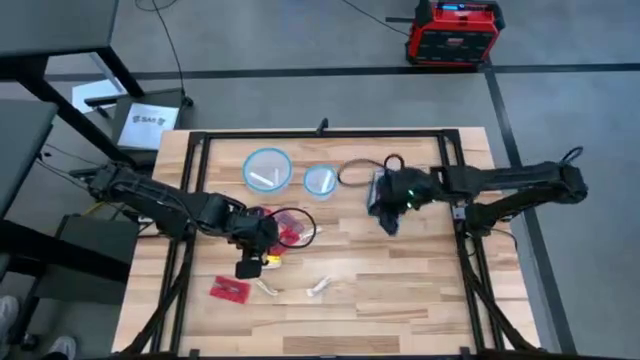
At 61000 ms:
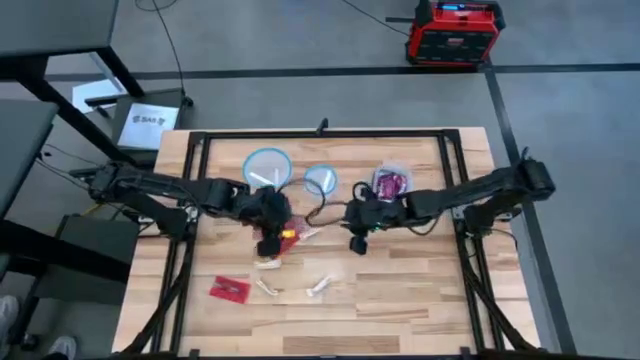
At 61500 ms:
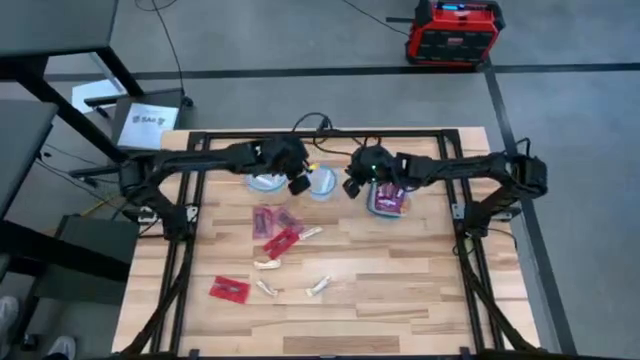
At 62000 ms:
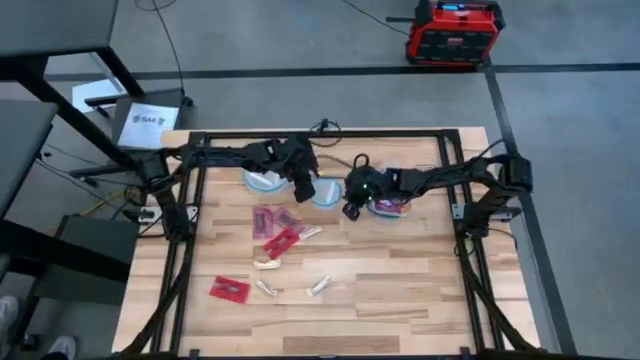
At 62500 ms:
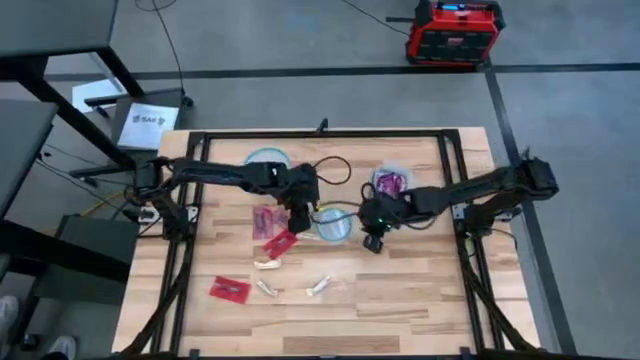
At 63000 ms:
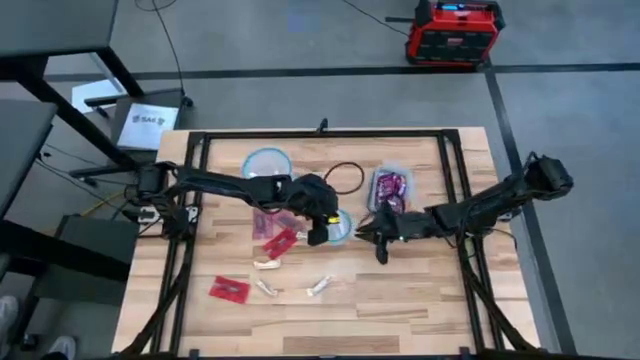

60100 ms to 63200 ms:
Task: Sort candy
Move the top center transparent bin to the middle

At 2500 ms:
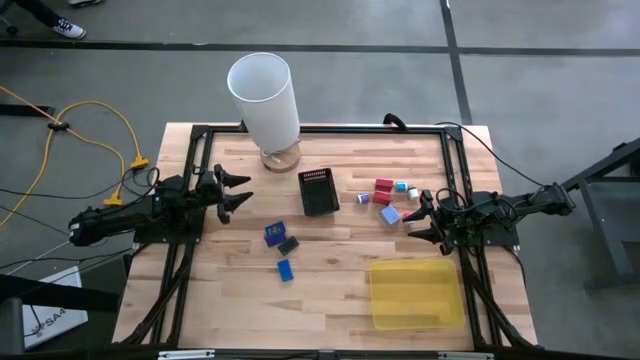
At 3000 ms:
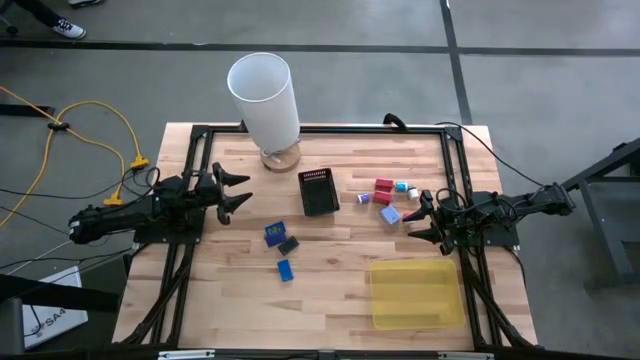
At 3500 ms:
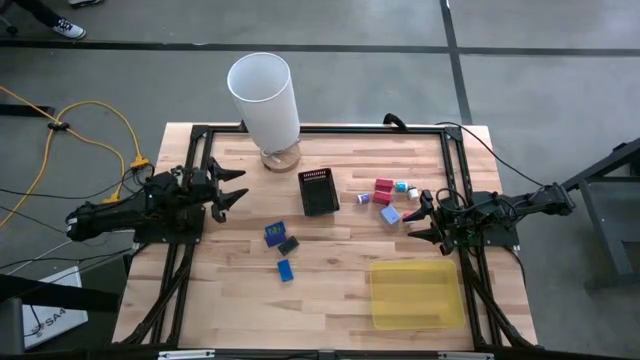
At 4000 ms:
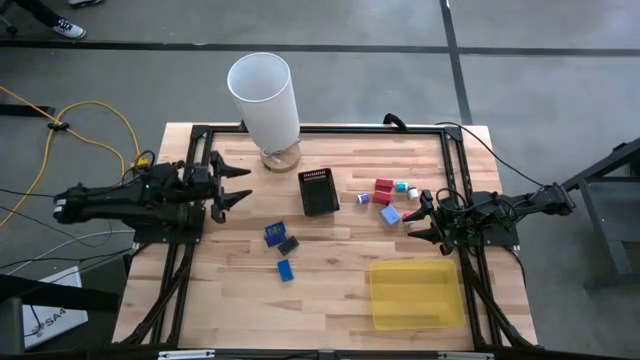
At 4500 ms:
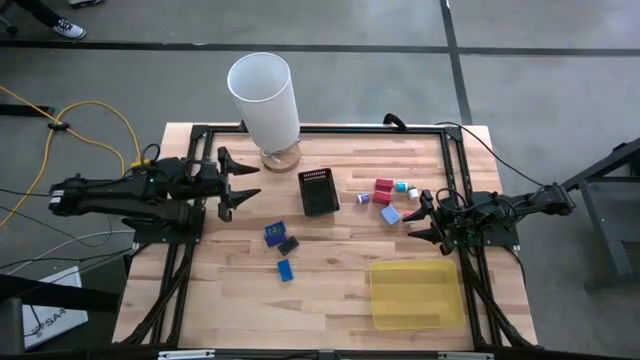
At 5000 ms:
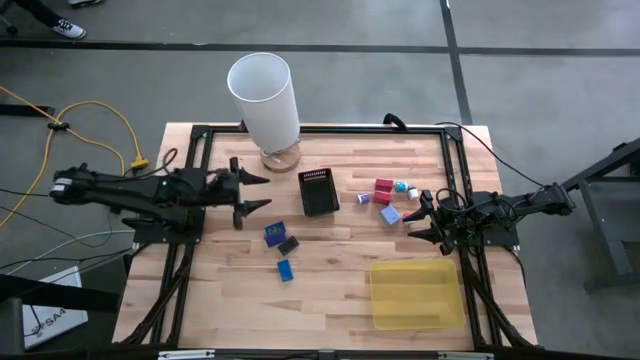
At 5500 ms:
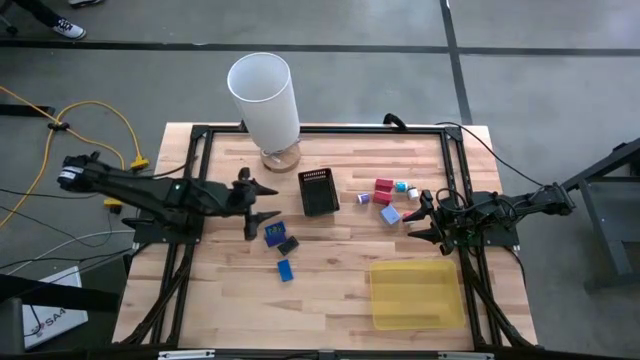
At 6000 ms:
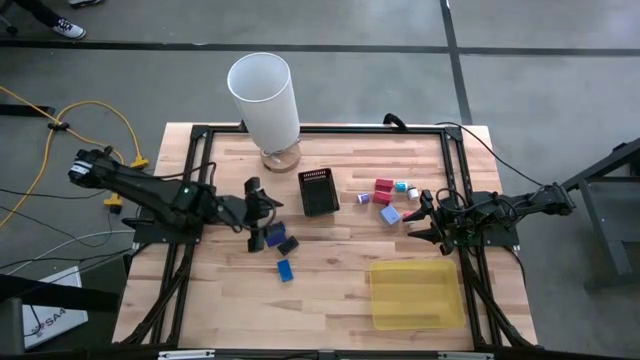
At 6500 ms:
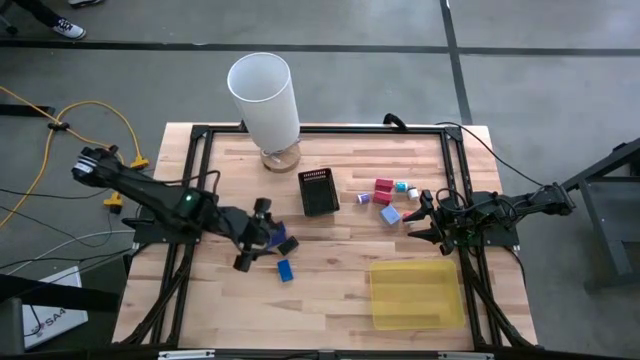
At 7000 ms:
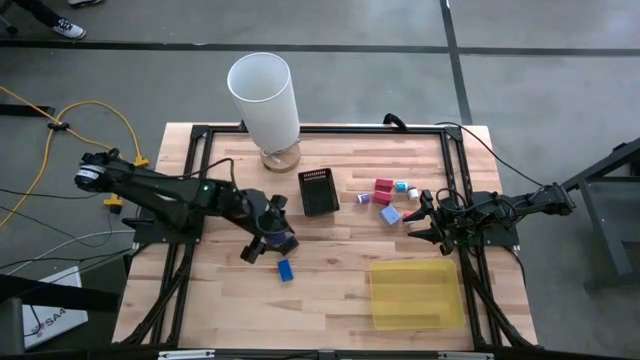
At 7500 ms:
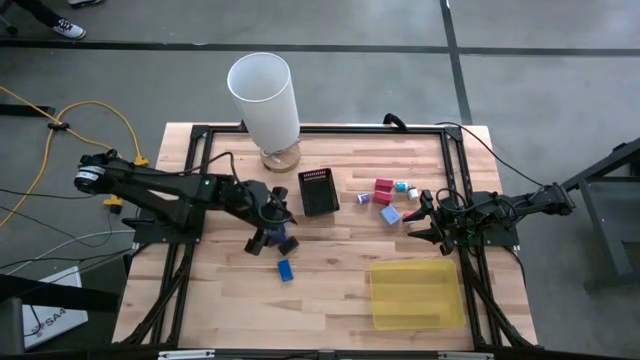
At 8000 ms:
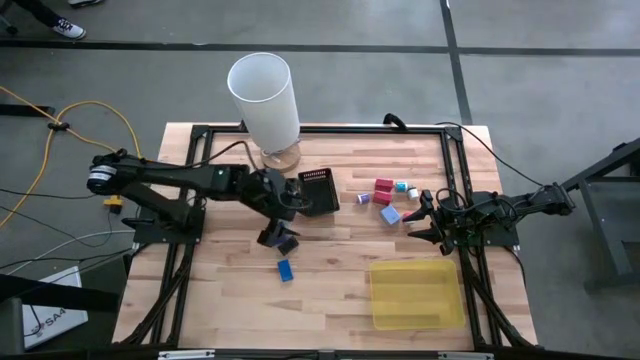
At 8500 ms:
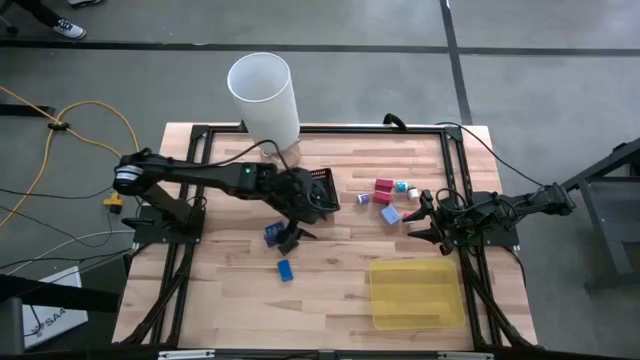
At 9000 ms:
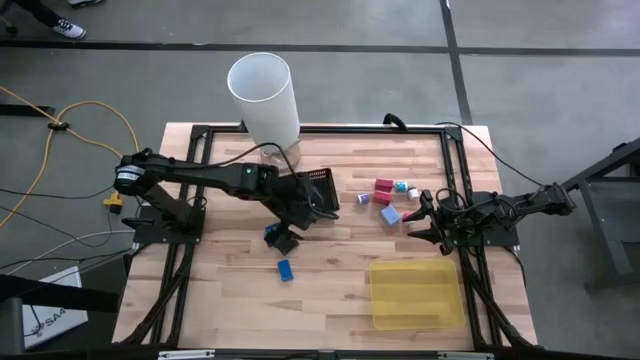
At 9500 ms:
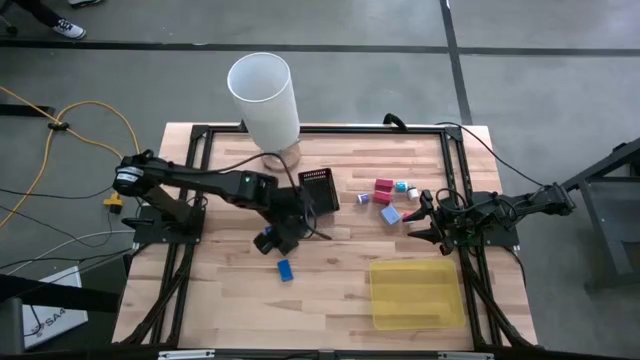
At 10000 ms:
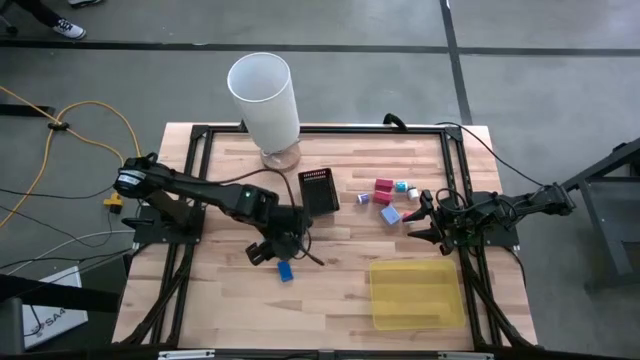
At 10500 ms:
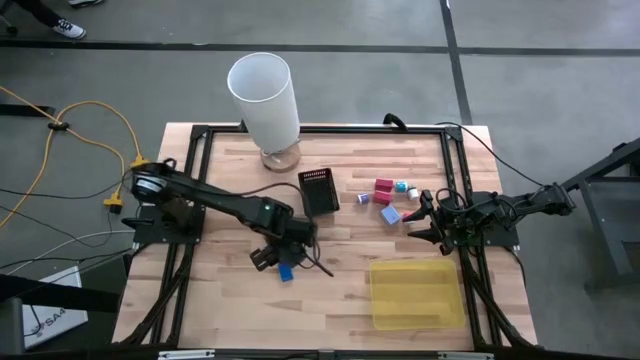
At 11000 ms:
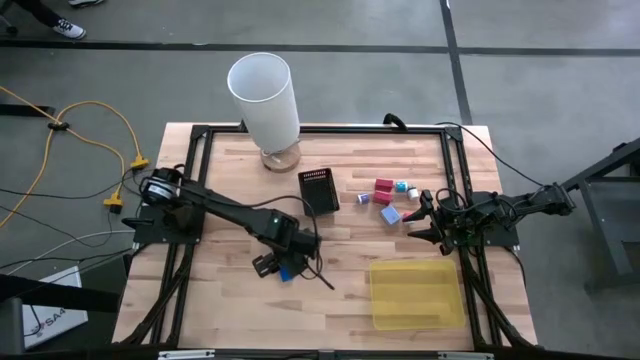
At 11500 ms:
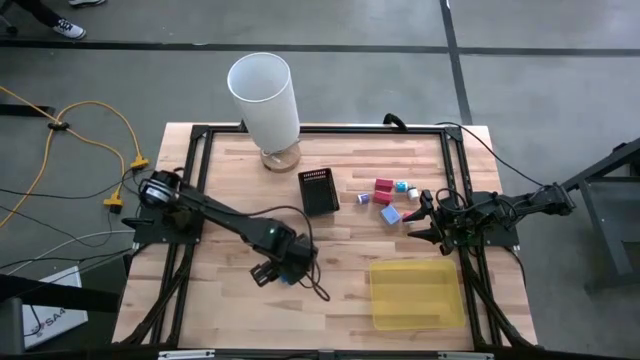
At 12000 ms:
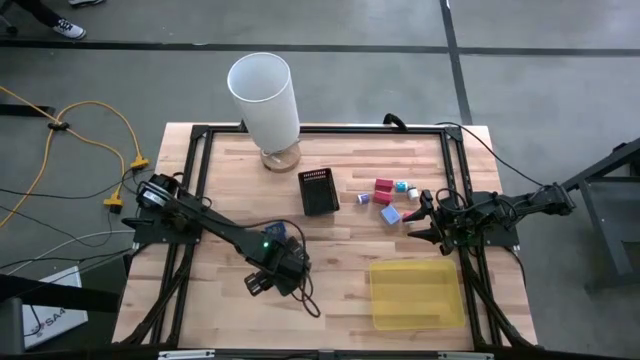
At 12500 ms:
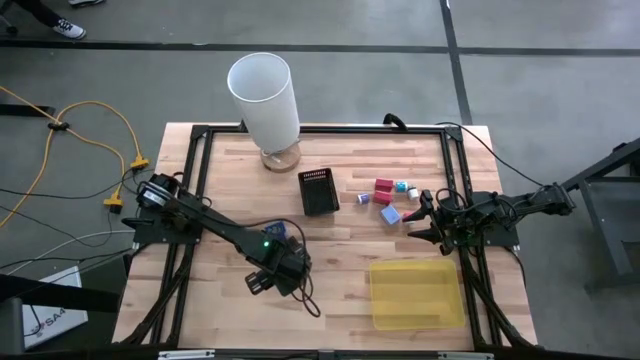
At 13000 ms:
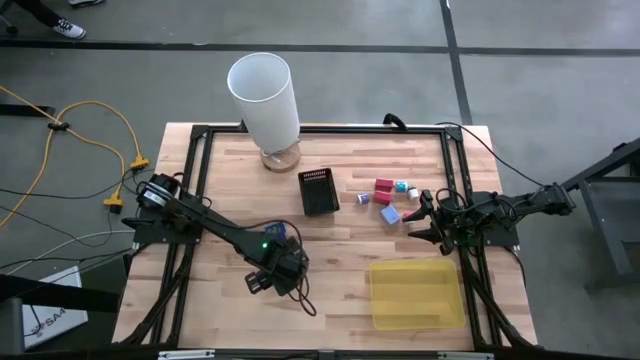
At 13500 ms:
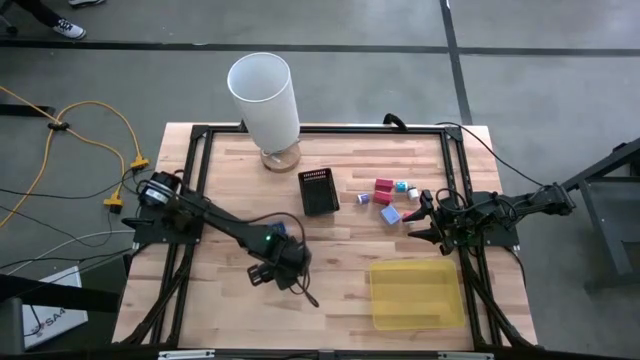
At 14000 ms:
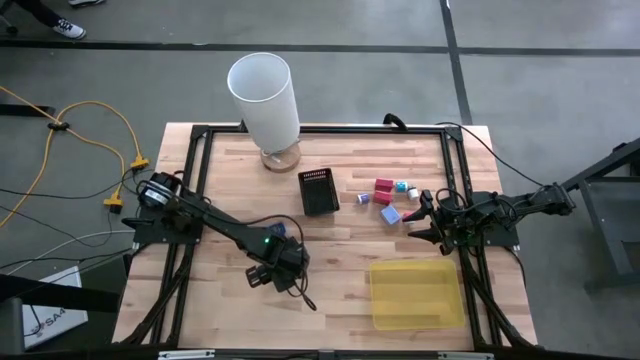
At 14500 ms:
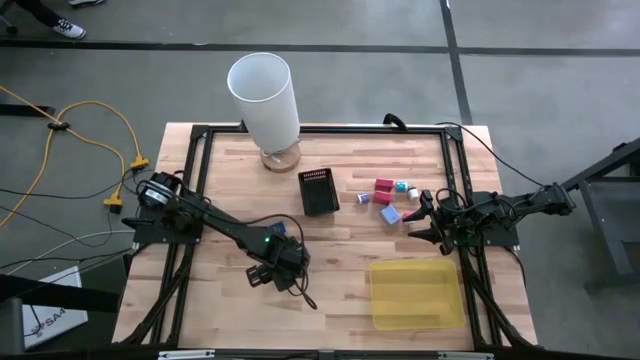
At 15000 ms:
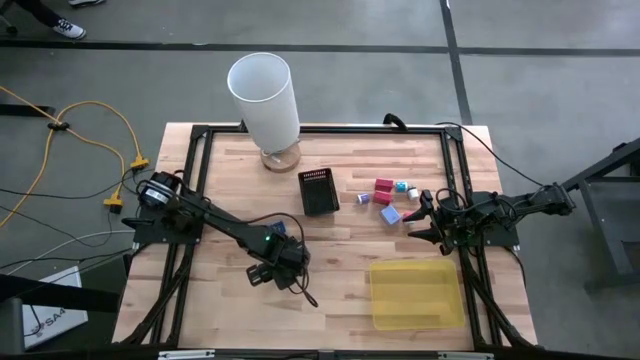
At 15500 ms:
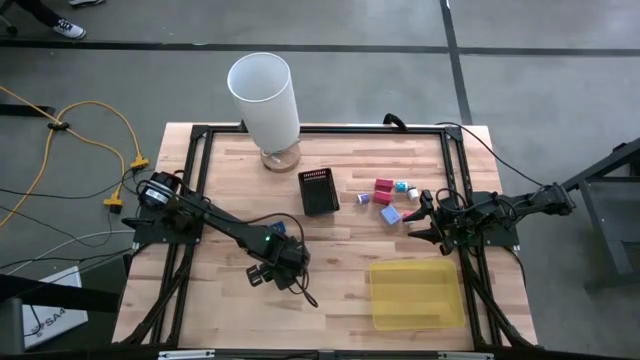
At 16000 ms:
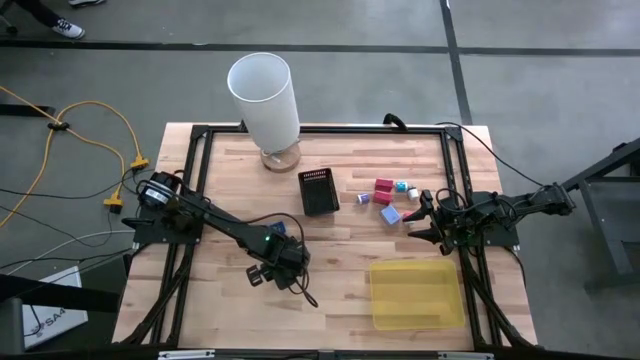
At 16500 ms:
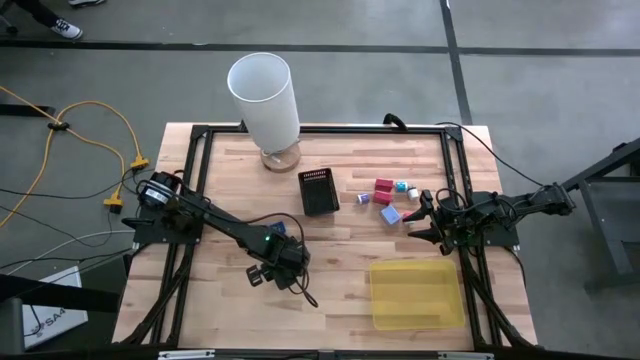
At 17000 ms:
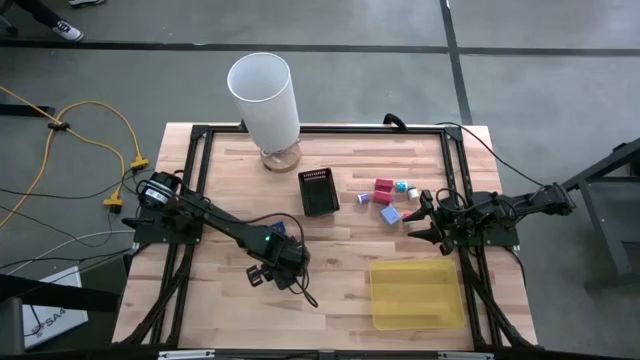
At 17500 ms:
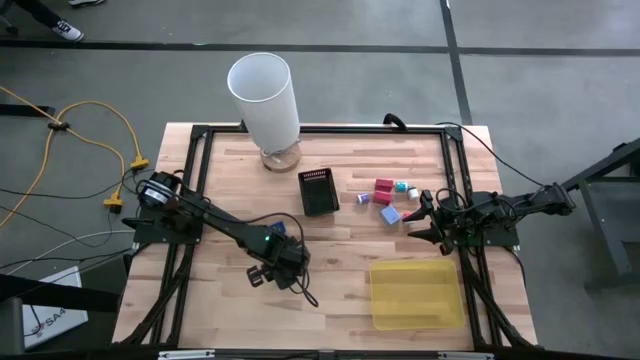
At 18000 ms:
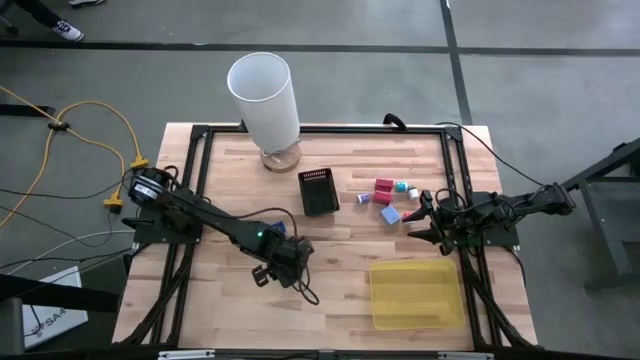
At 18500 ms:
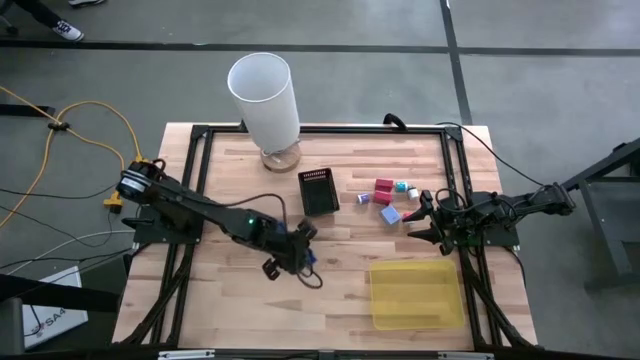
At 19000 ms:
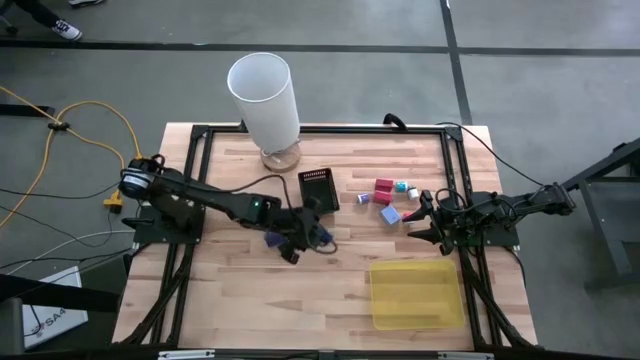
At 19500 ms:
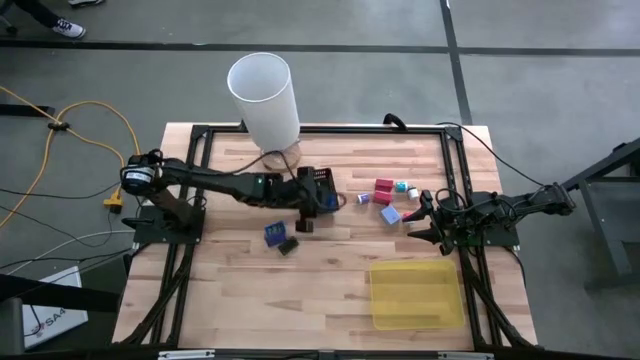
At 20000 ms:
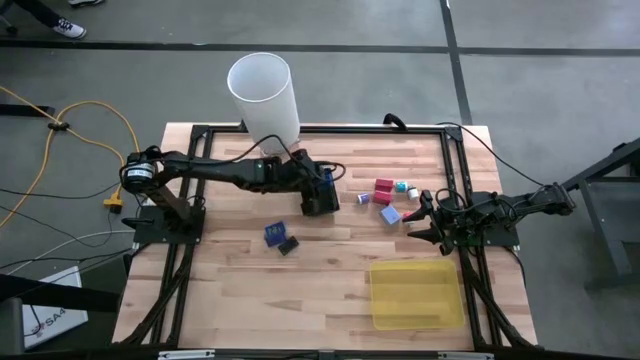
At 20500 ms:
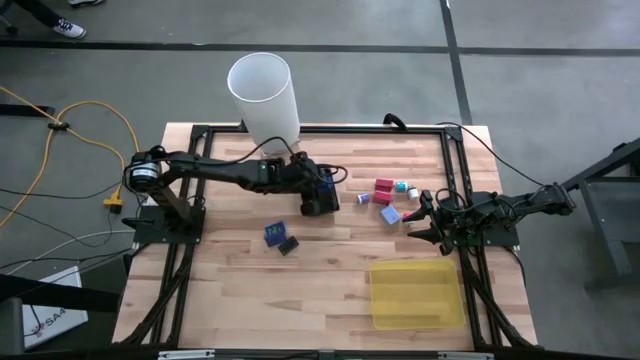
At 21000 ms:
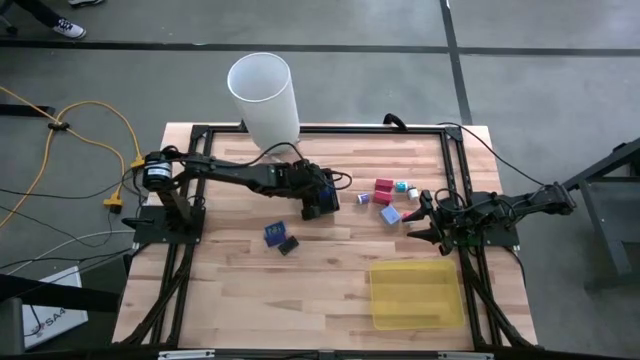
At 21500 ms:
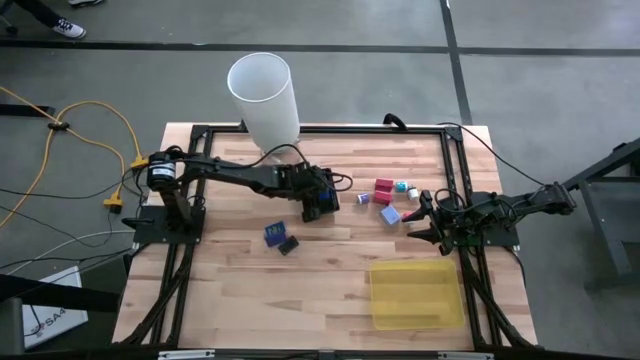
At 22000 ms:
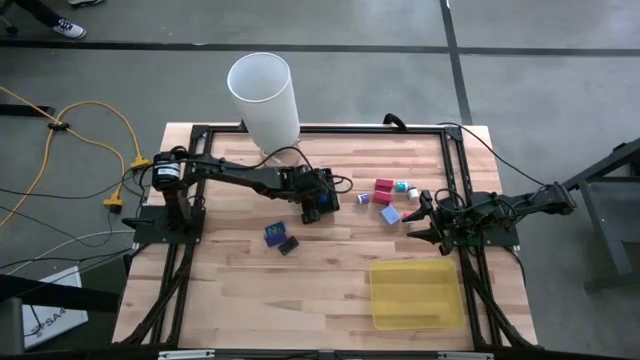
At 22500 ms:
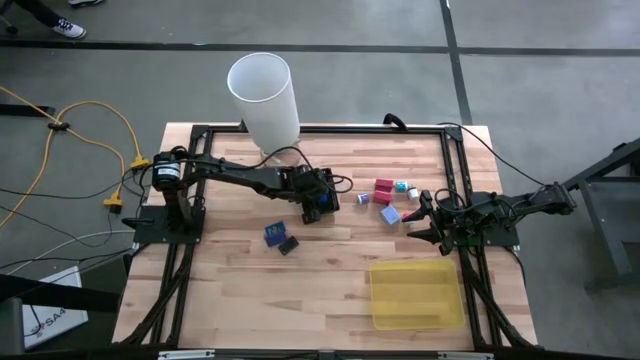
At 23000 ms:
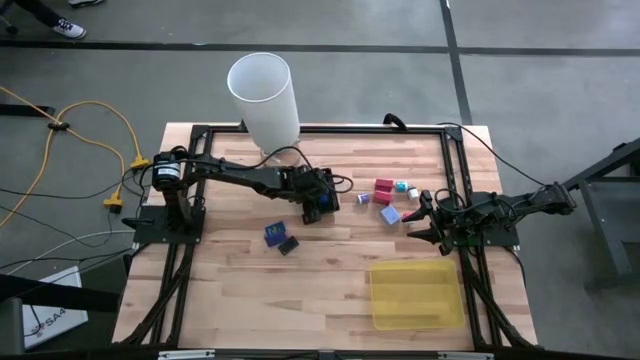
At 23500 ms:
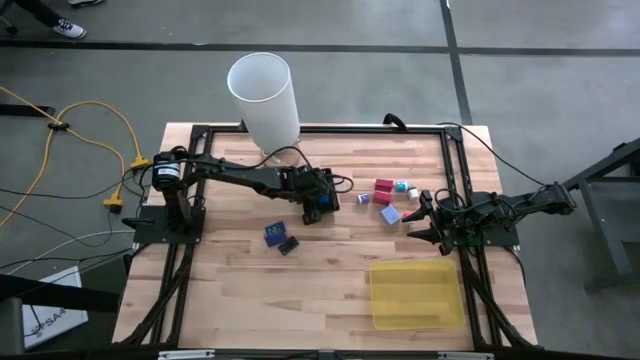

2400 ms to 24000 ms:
Task: Pick & Place Office items
Put the bottom blue digital timer into the black bin
